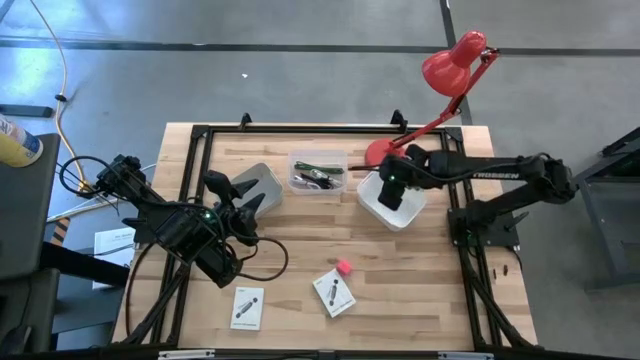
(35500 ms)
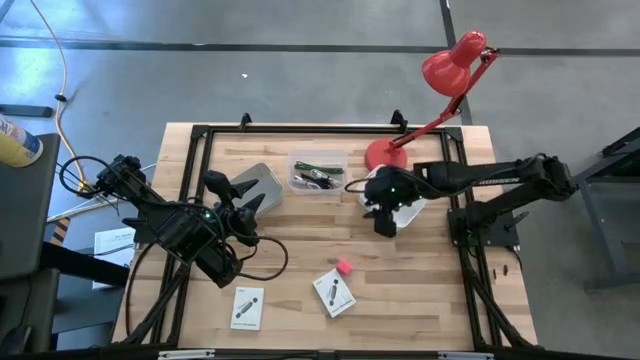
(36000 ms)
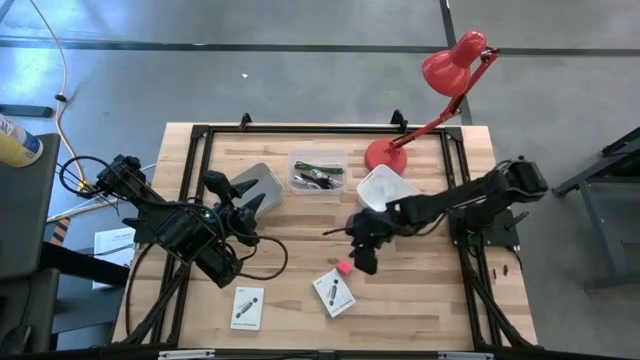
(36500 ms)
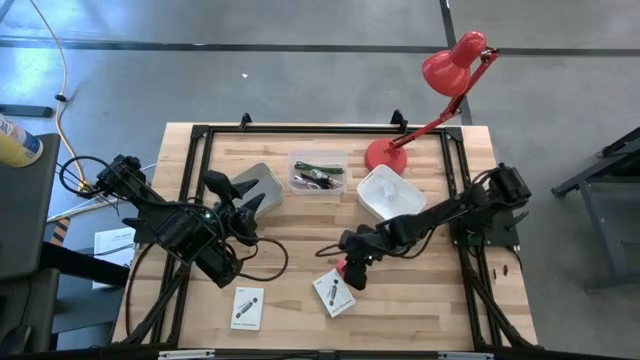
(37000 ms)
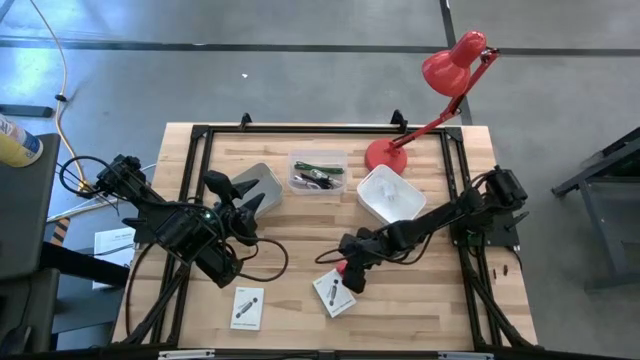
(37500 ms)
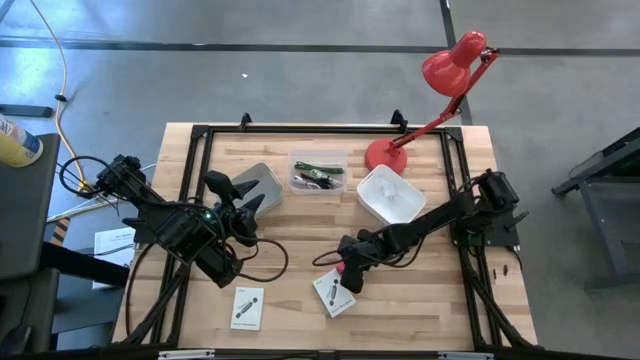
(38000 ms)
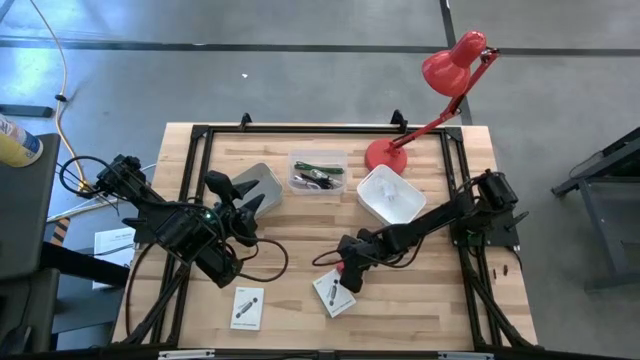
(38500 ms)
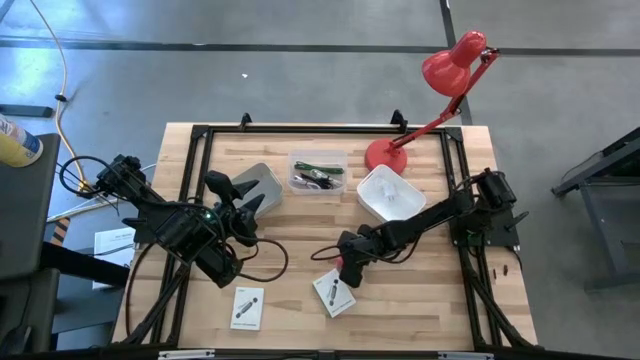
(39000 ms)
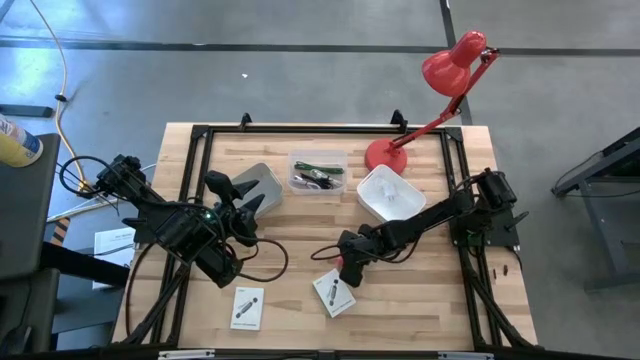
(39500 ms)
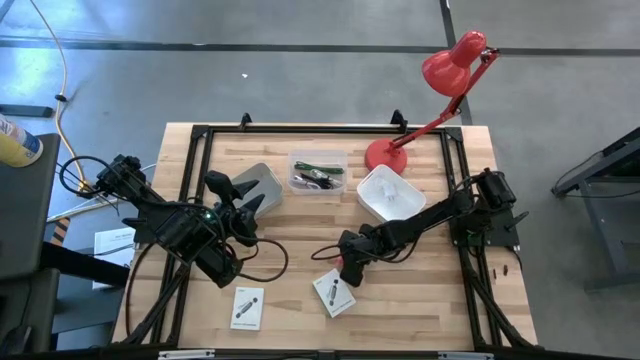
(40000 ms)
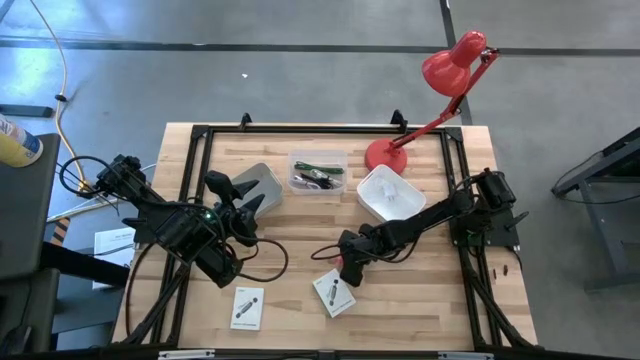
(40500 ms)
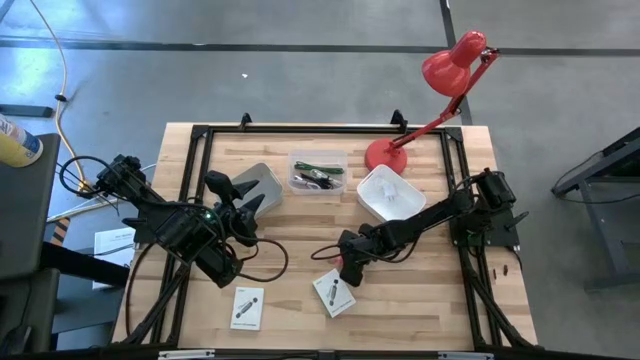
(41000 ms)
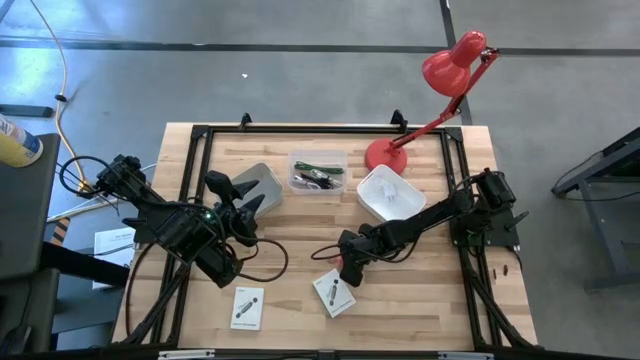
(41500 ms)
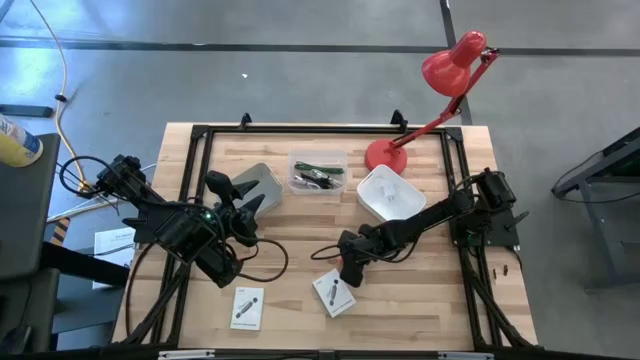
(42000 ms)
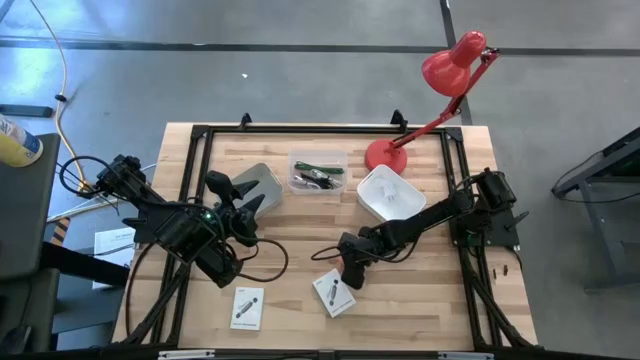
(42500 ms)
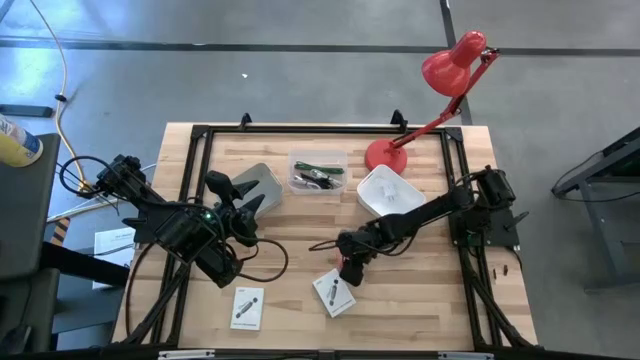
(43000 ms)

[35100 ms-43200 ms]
Task: Pick and place items into bin
Put the pink charger adapter into the white bin

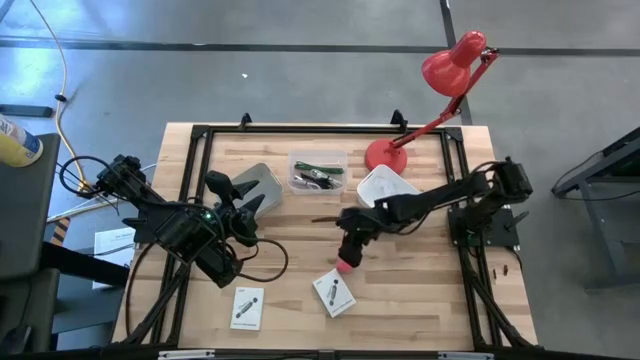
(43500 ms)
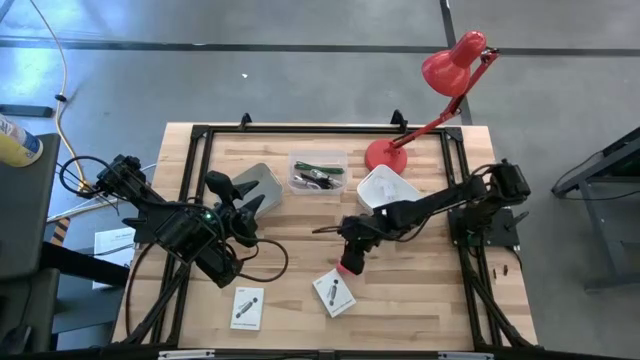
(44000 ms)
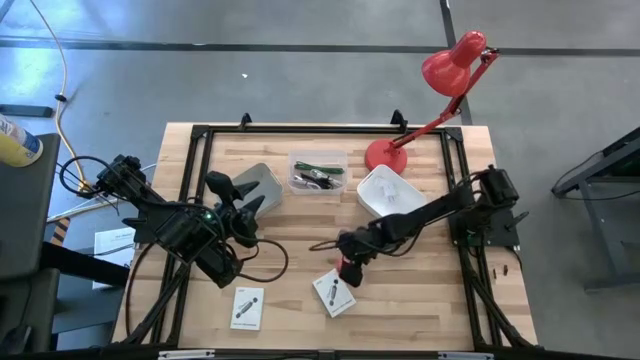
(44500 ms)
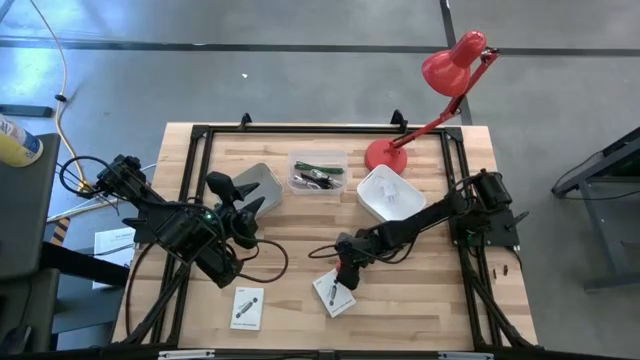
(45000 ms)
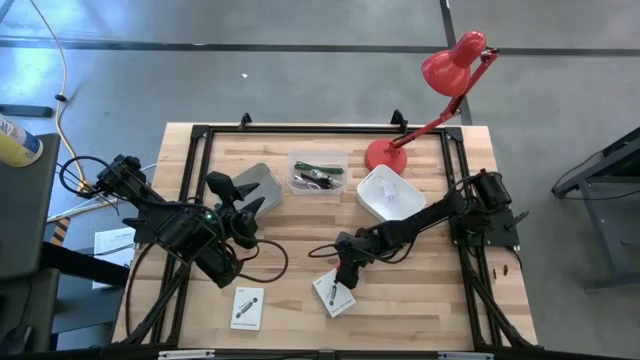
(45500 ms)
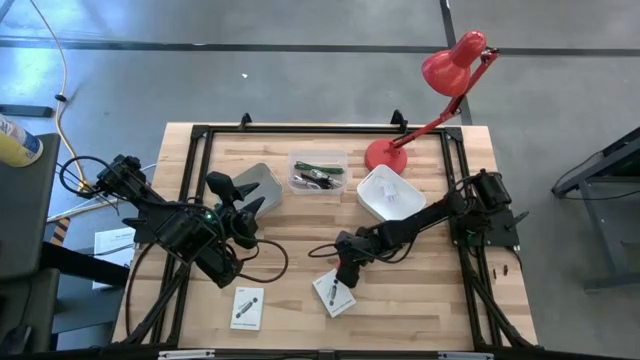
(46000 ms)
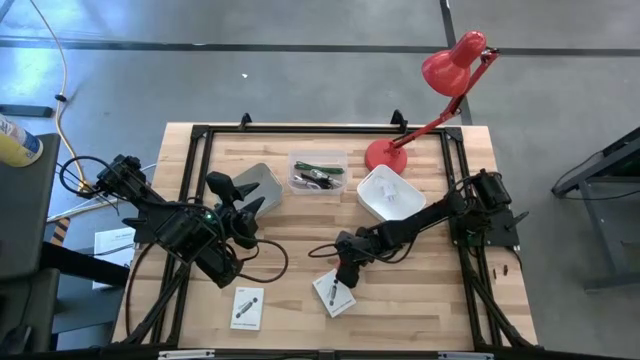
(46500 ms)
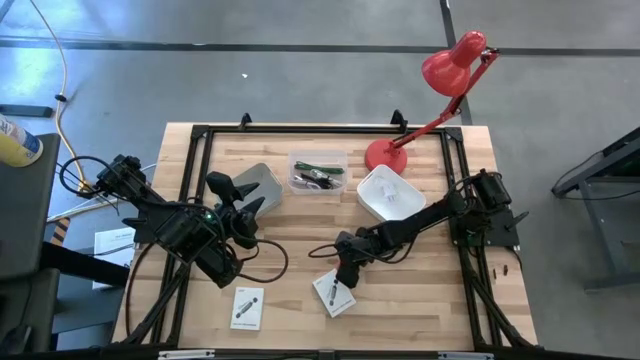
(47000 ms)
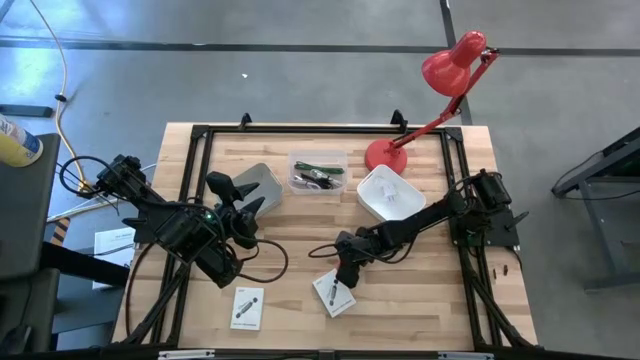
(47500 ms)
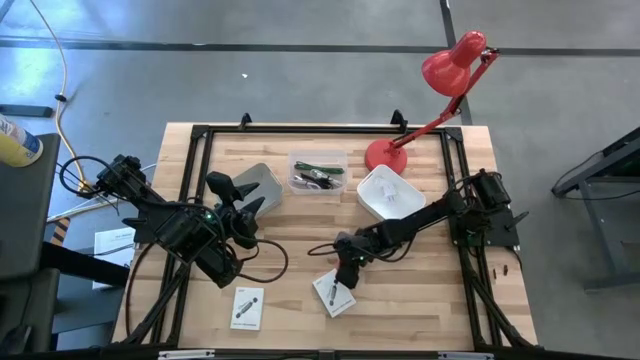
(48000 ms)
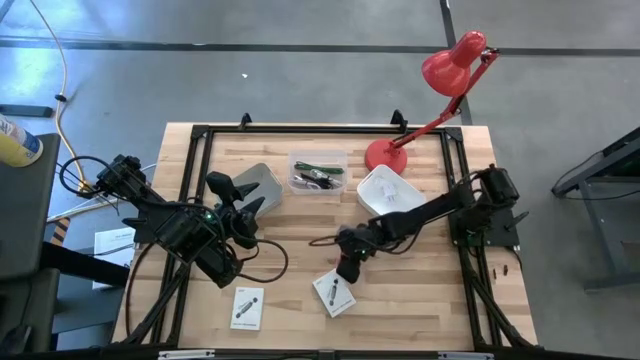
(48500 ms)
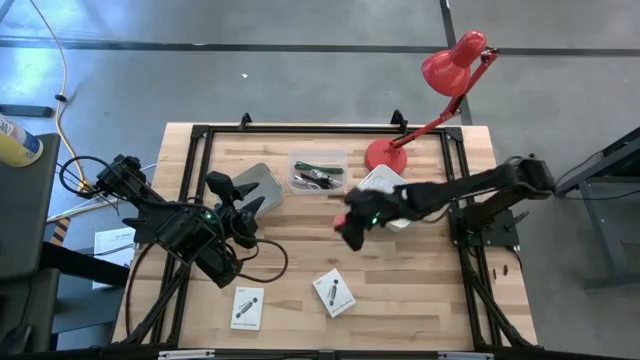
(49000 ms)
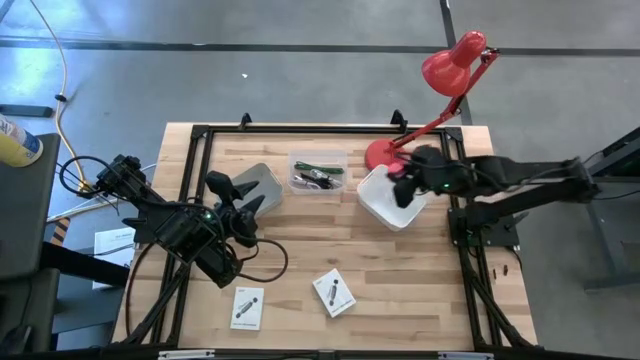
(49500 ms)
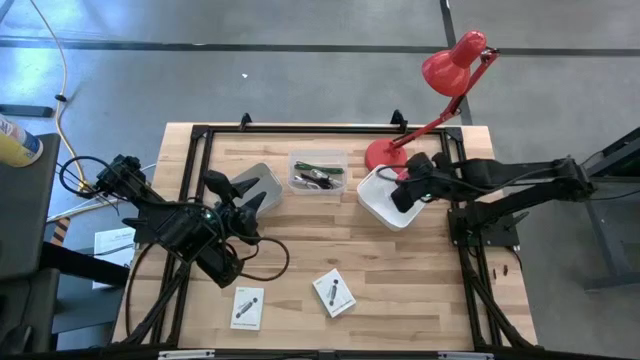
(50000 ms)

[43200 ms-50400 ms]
Put the pink charger adapter into the white bin

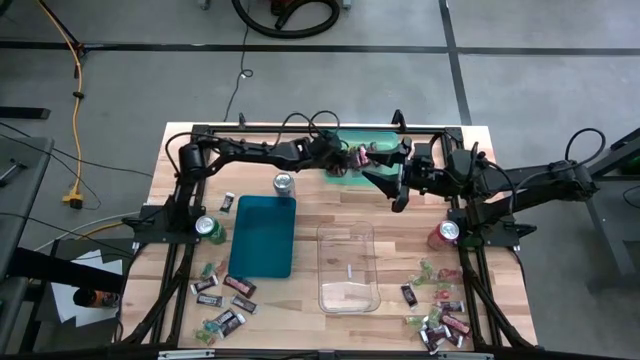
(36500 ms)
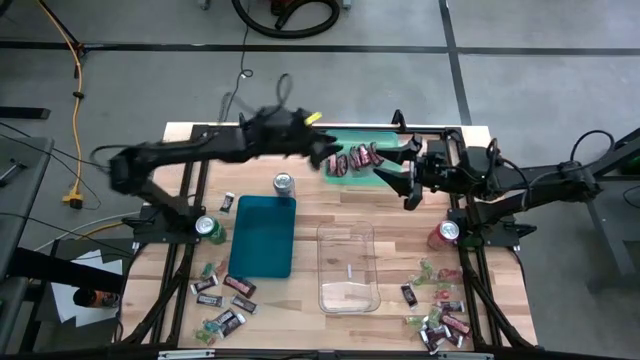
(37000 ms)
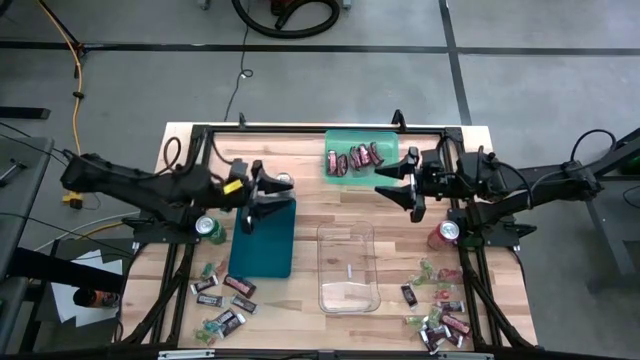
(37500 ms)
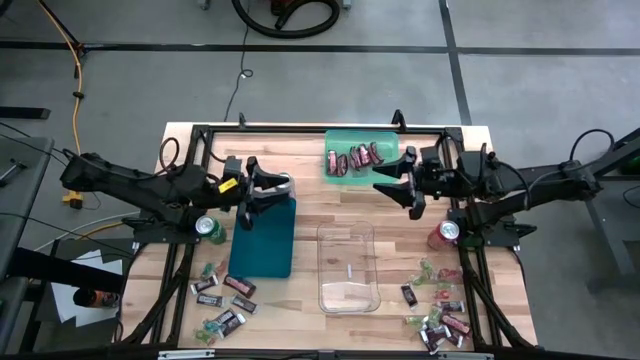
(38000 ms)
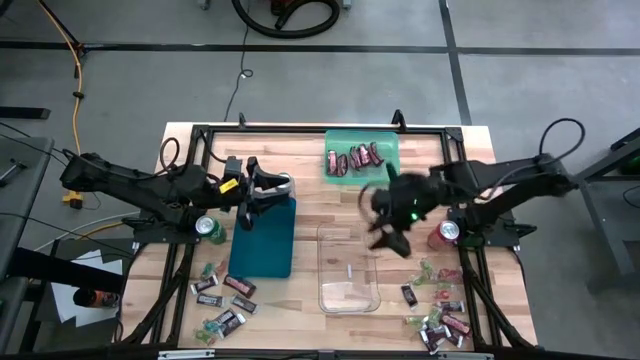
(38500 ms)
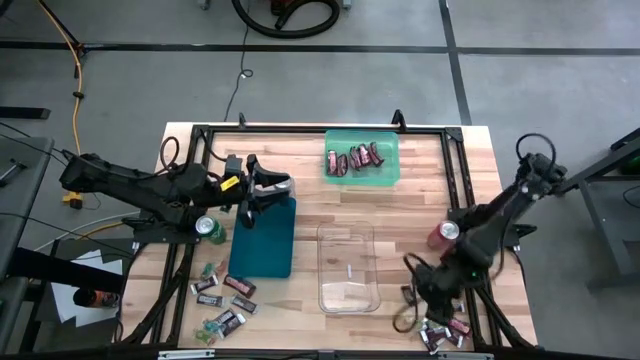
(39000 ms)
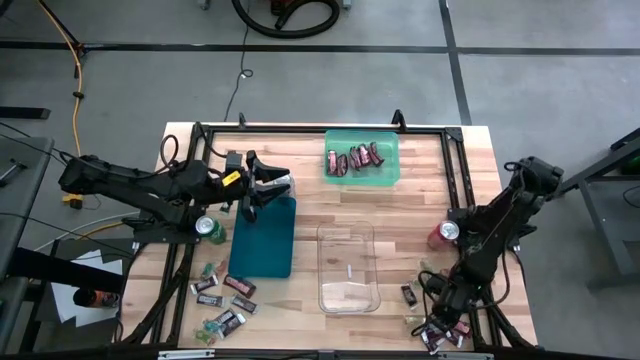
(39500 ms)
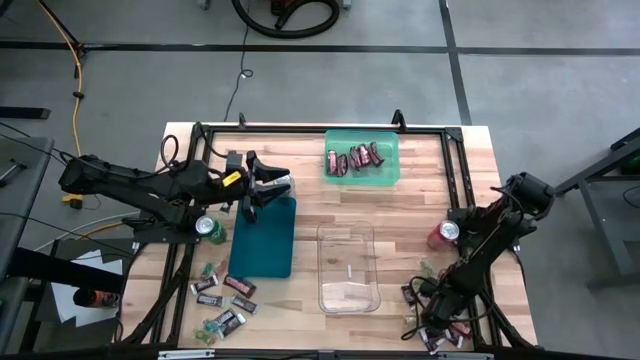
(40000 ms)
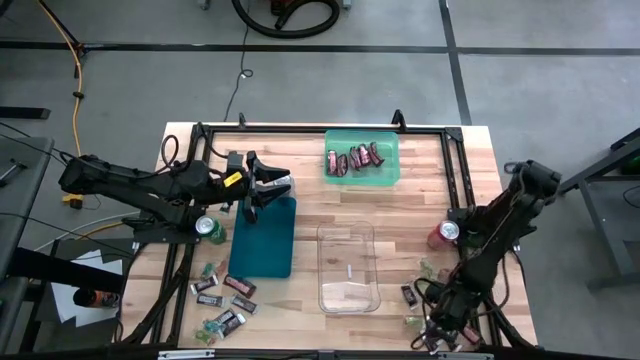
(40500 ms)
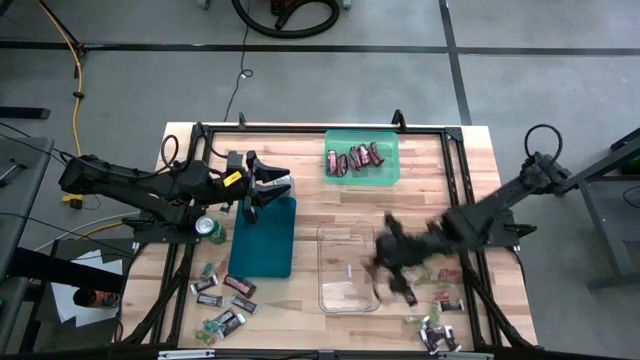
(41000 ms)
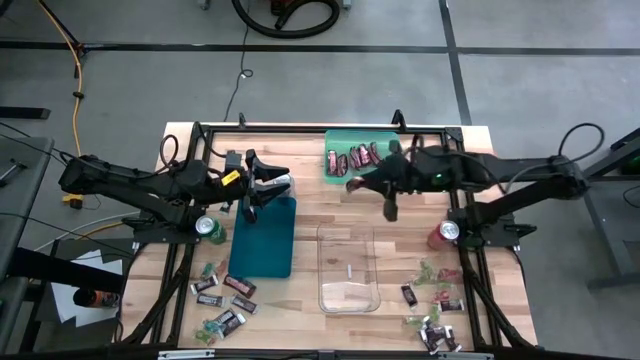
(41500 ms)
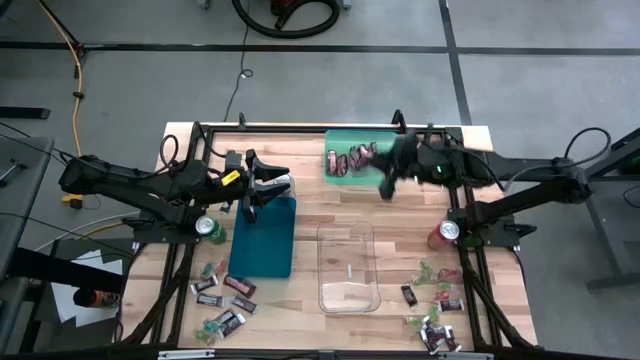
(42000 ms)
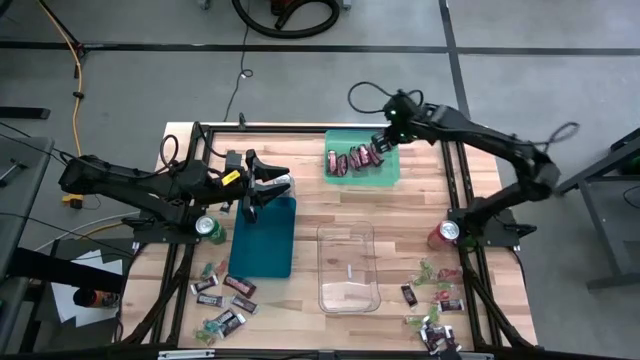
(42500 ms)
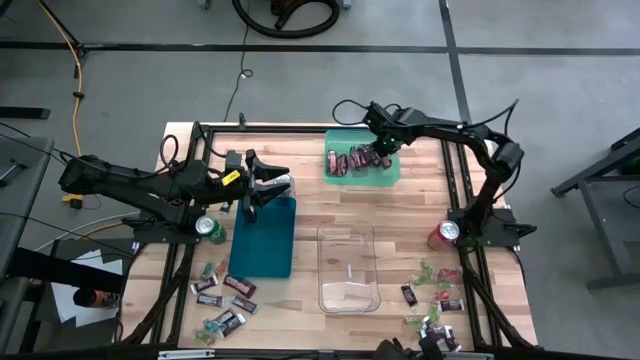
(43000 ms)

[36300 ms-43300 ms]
Task: Sort candy
Put the chocolate peanut bar into the green bin
